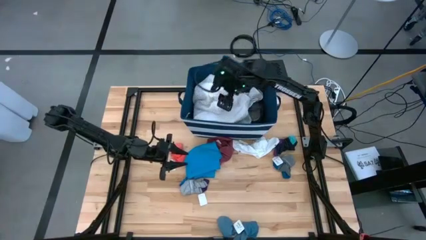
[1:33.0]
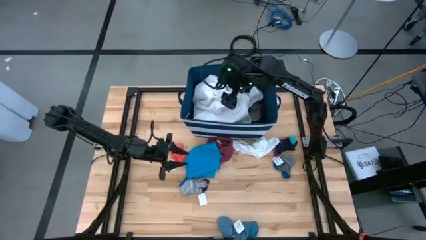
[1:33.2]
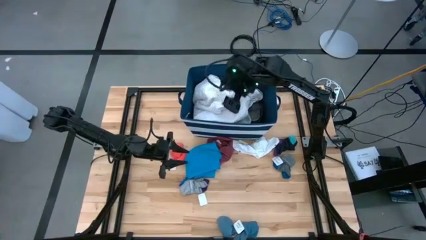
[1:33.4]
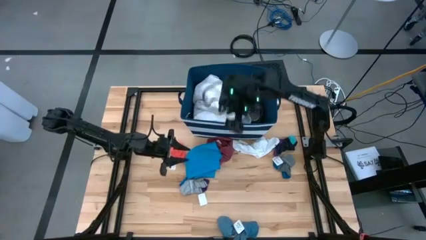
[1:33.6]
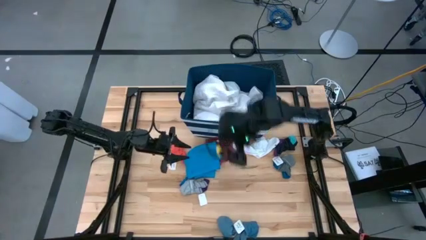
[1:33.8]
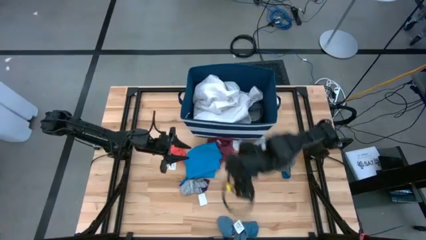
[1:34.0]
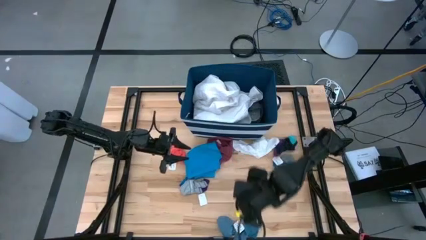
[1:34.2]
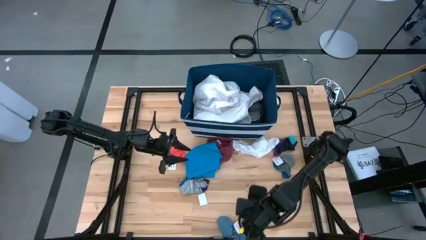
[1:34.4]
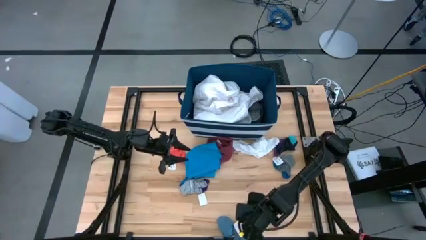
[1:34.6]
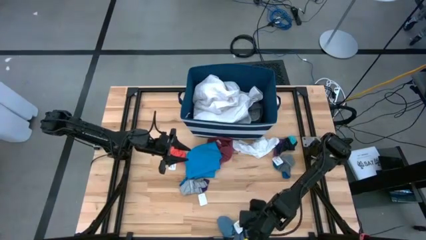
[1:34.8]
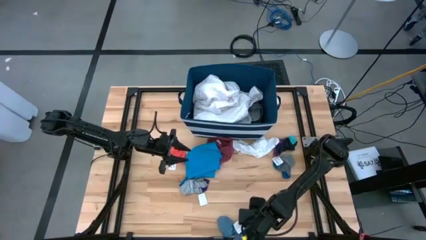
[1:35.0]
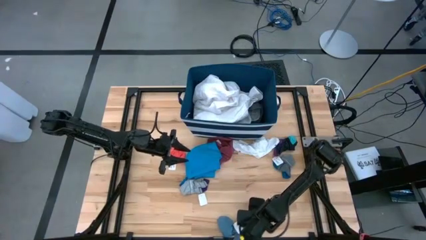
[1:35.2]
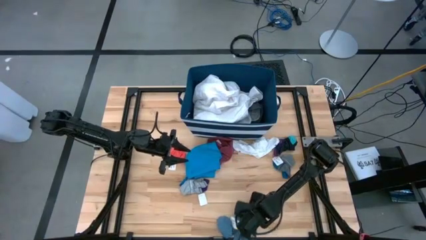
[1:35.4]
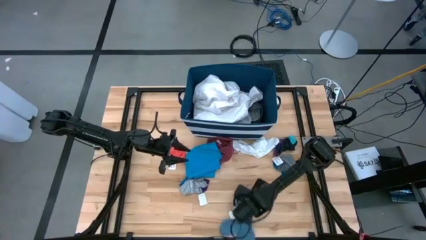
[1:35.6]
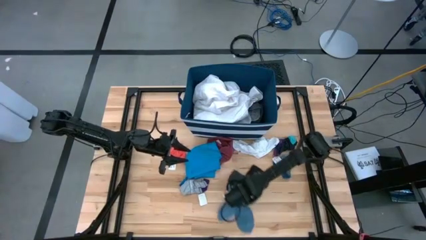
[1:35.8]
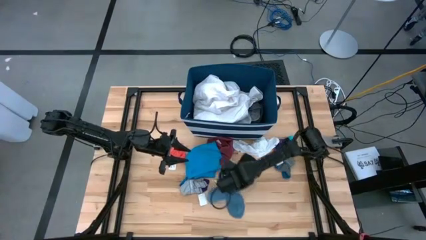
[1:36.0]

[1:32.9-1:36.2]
Task: Sort clothes
Move the blue socks to the center of the table

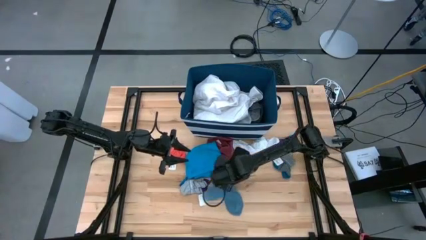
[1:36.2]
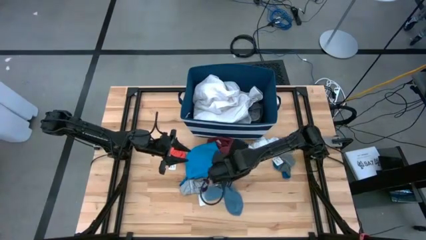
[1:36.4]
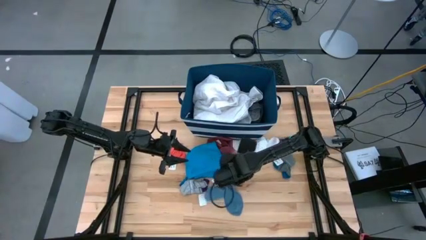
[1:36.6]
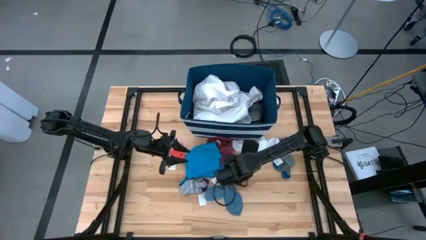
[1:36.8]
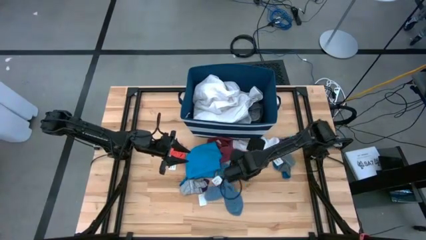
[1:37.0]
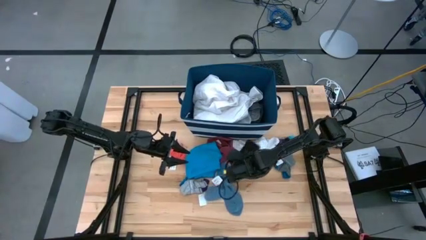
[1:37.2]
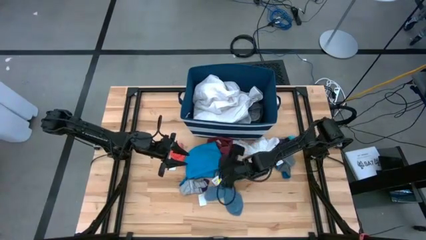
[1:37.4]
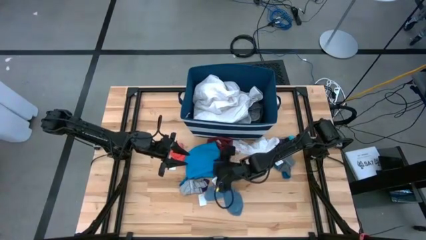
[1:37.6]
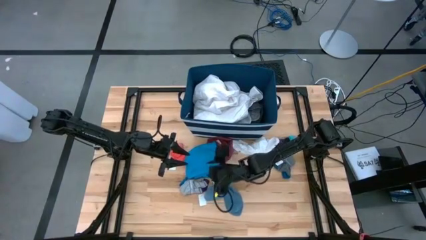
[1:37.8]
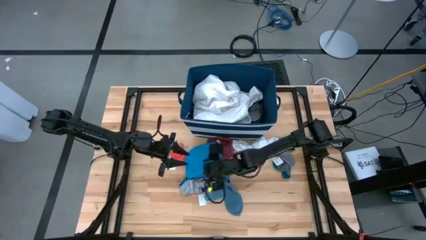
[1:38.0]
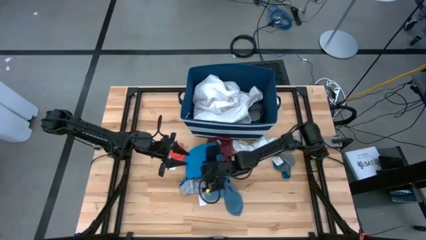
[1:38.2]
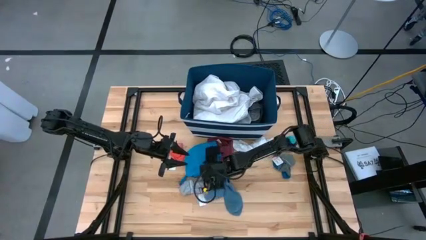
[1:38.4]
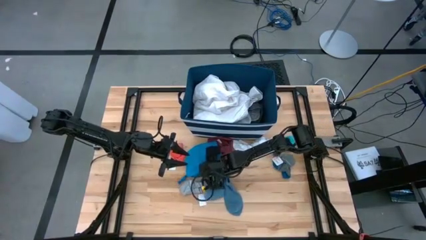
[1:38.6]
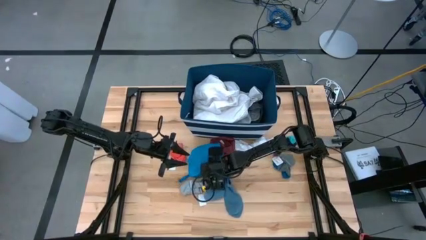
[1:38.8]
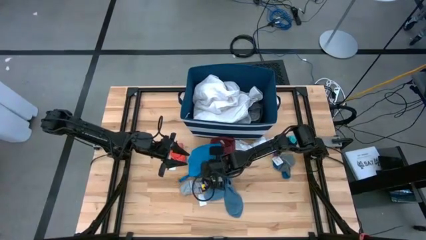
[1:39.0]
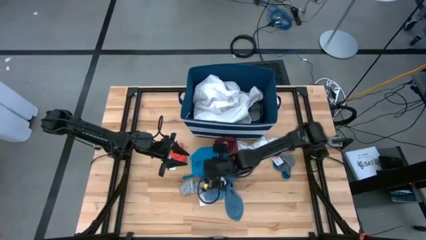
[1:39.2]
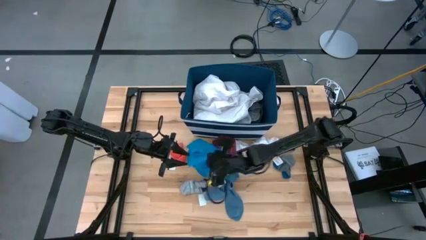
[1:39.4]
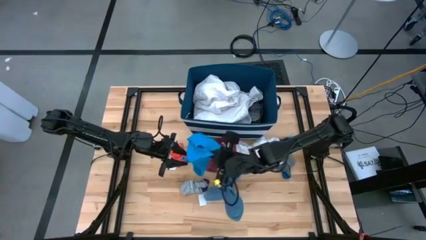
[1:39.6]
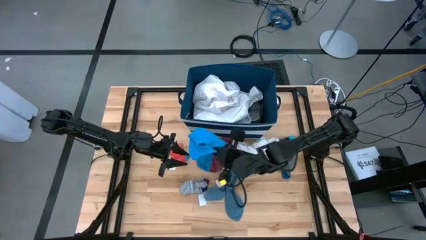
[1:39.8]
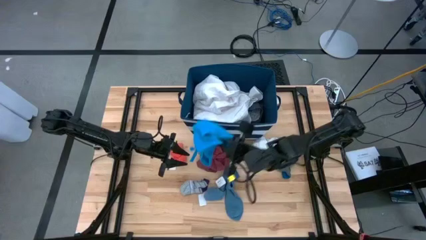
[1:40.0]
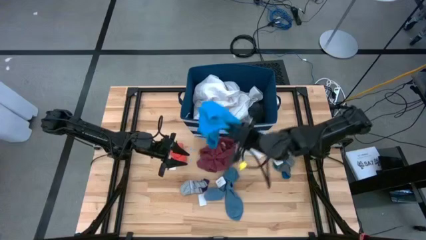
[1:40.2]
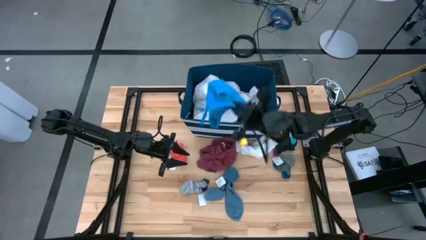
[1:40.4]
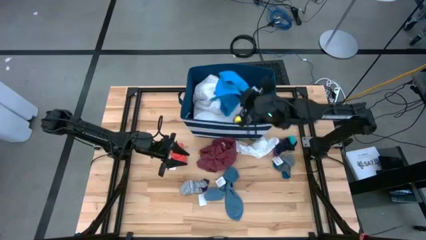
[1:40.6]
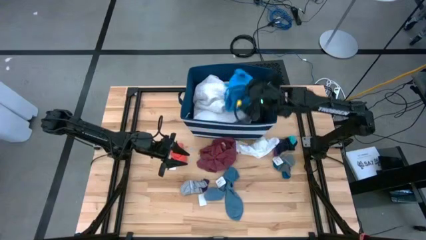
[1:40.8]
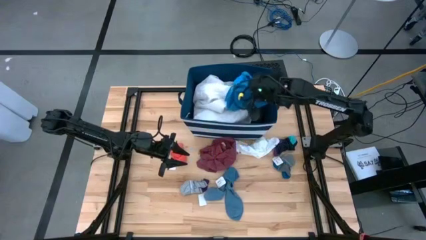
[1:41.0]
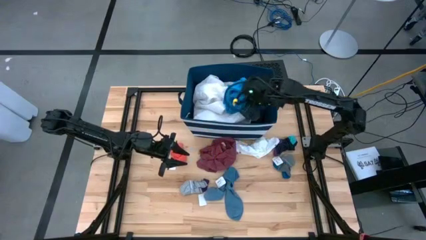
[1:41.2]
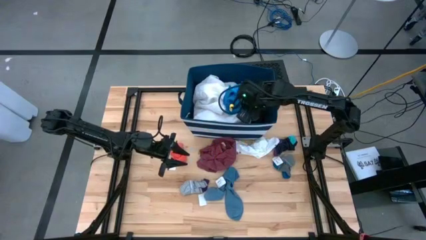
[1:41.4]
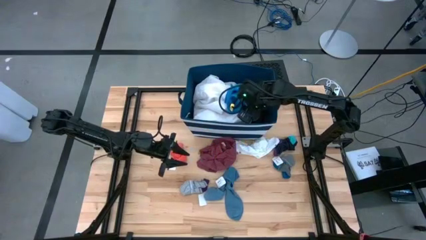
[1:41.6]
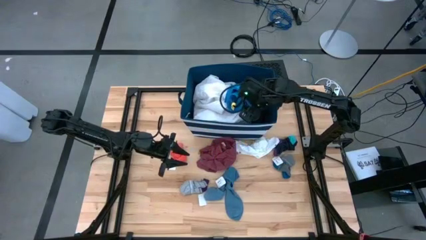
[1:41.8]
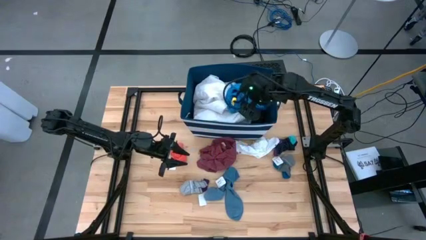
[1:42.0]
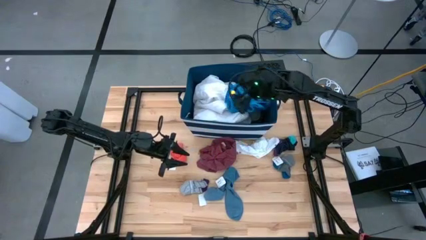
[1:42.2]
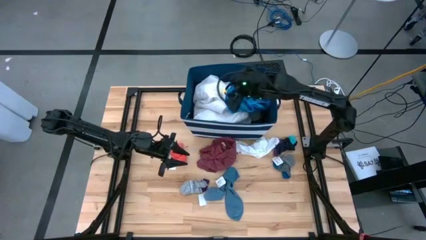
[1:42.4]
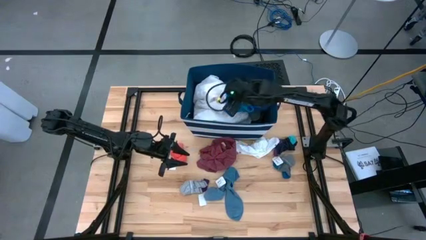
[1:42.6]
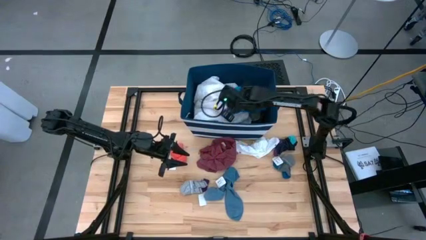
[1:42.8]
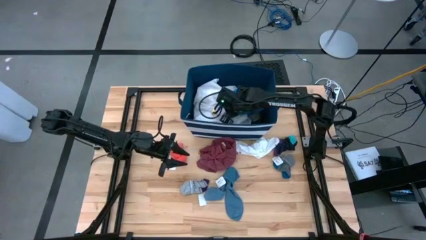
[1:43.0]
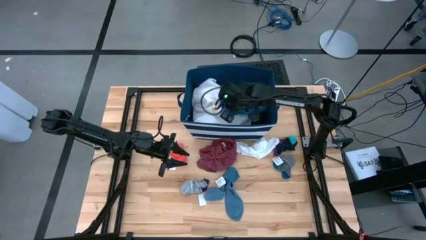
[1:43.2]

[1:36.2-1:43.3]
Put the light blue underwear into the blue laundry organizer

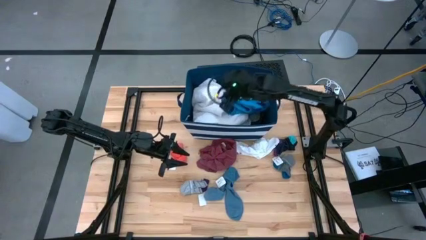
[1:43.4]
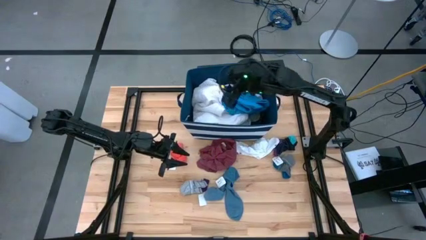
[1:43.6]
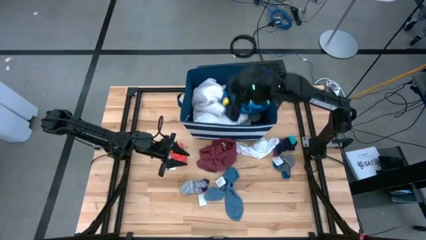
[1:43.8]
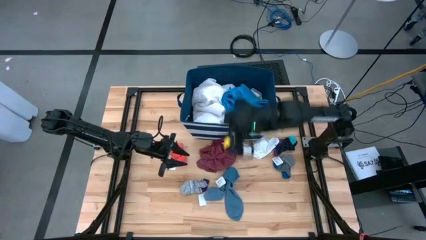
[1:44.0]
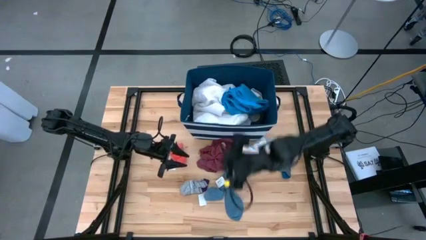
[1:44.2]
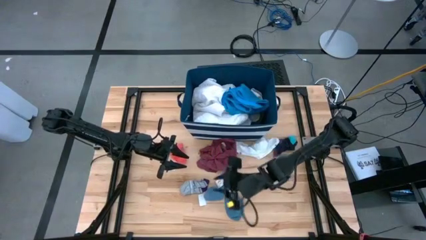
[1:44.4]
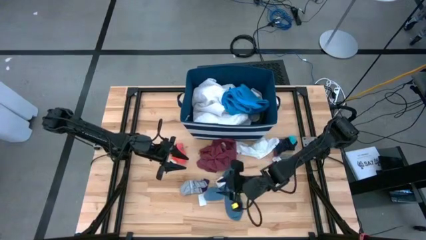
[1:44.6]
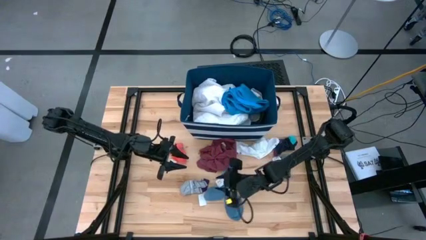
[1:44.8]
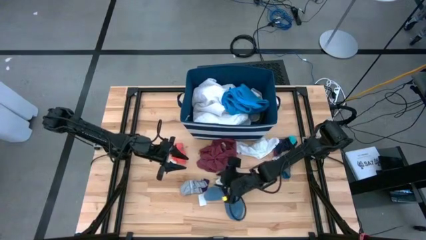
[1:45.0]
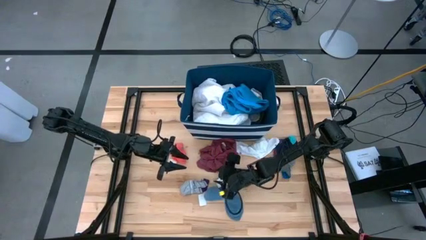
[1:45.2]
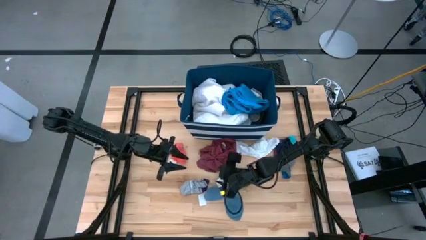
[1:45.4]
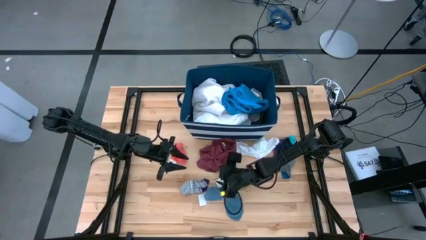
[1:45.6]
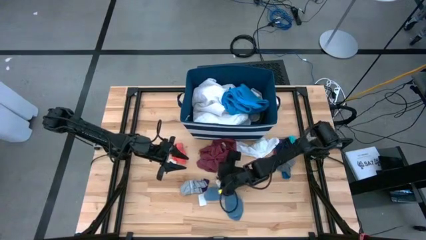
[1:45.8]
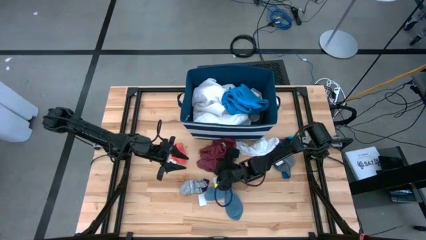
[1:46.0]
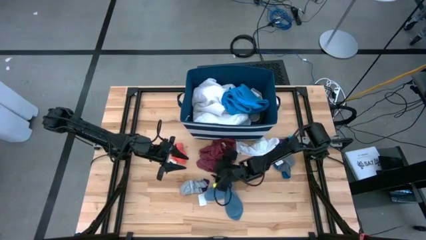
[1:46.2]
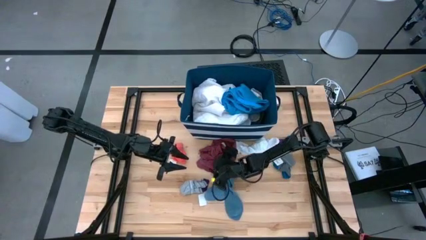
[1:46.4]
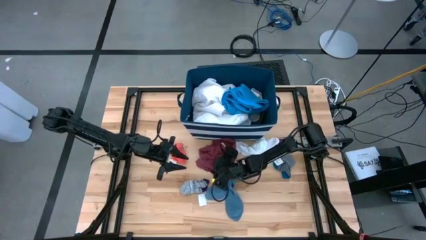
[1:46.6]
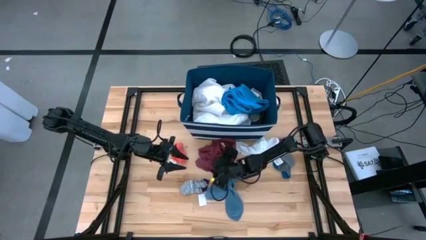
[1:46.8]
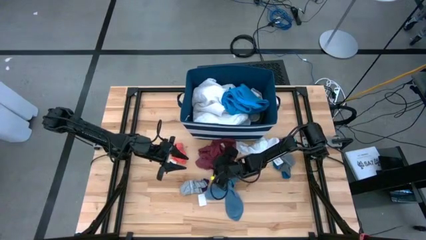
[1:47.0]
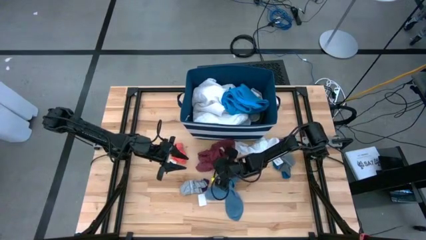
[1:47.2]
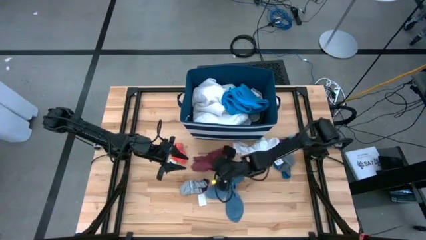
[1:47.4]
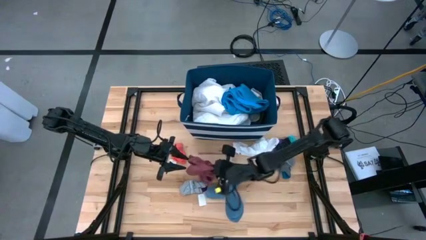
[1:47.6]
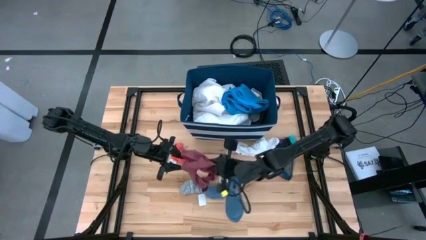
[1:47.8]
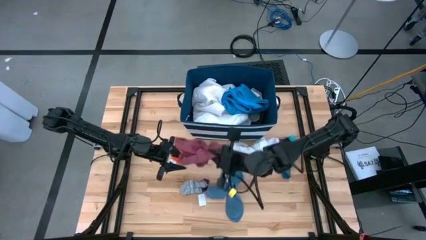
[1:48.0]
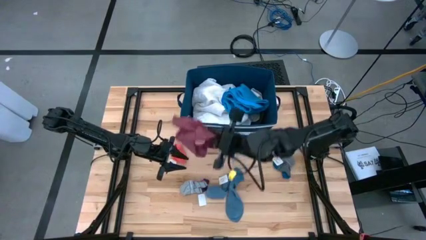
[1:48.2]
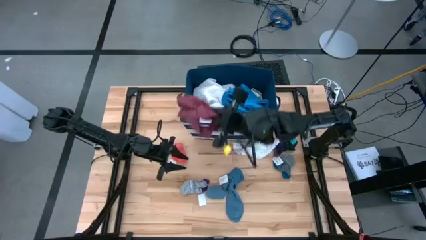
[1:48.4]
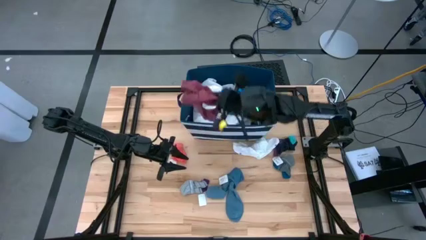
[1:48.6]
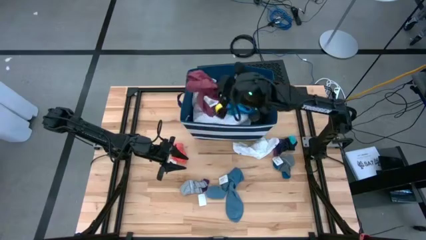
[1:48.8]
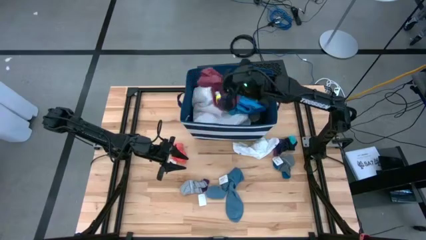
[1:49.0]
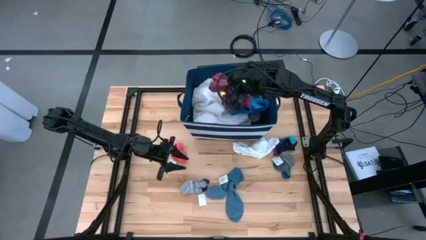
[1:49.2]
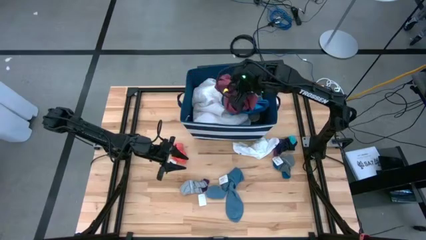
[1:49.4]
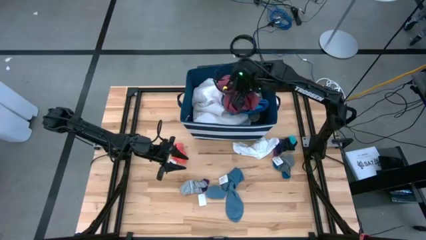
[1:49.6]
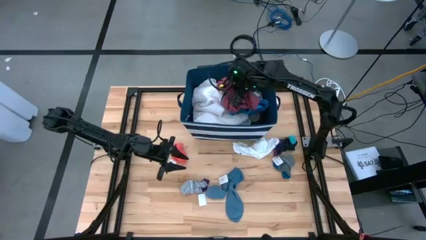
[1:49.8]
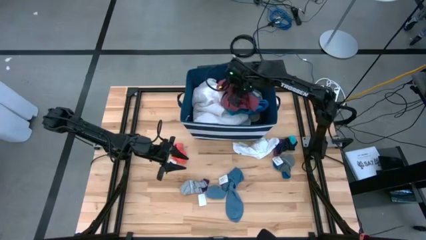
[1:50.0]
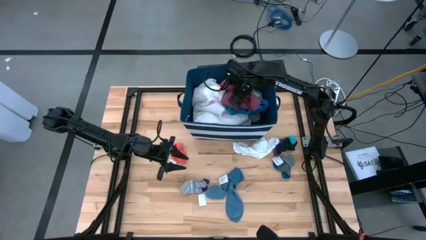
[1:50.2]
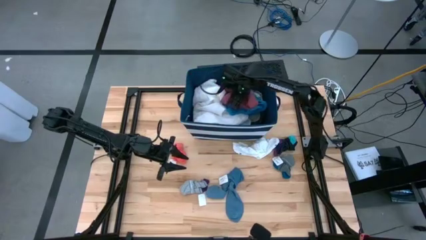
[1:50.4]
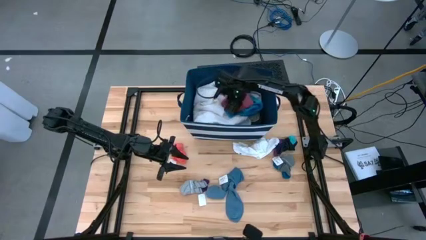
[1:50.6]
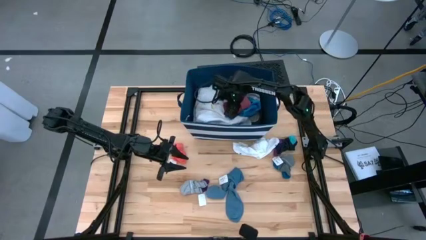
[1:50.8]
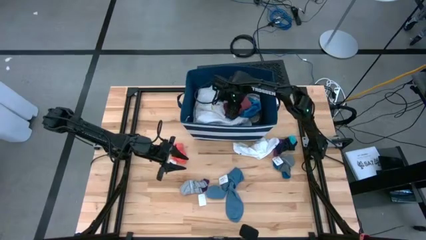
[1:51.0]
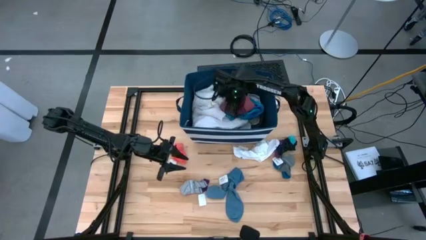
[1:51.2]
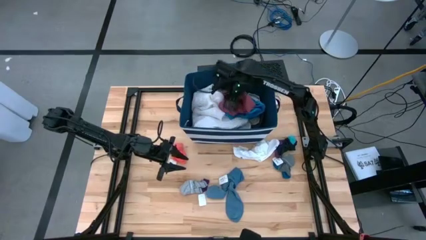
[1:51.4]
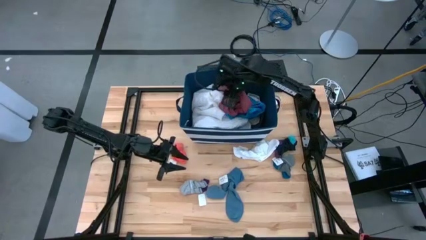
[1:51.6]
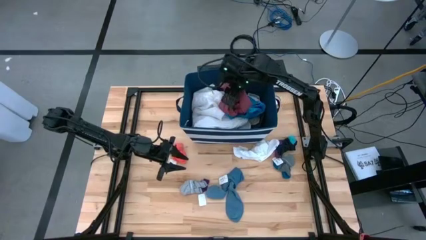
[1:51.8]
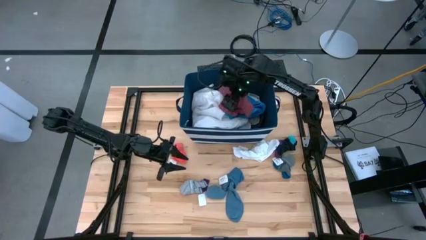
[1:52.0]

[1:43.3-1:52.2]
Put the dark red underwear into the blue laundry organizer
